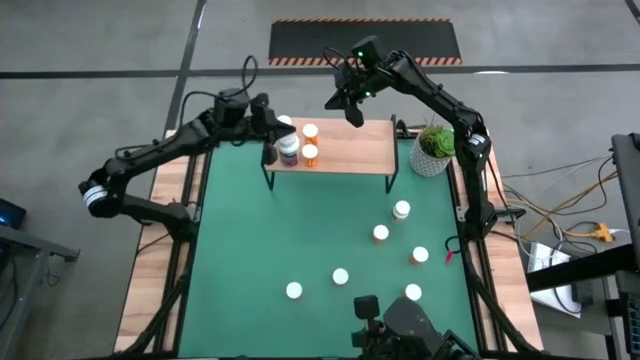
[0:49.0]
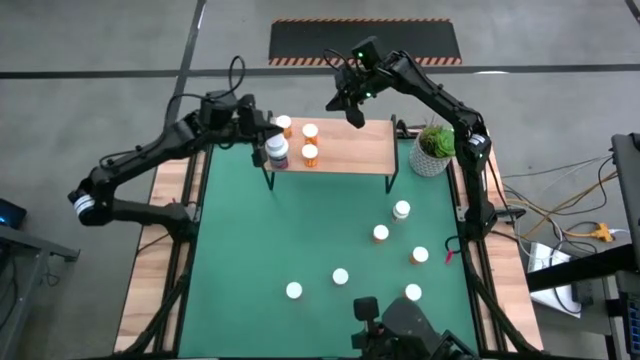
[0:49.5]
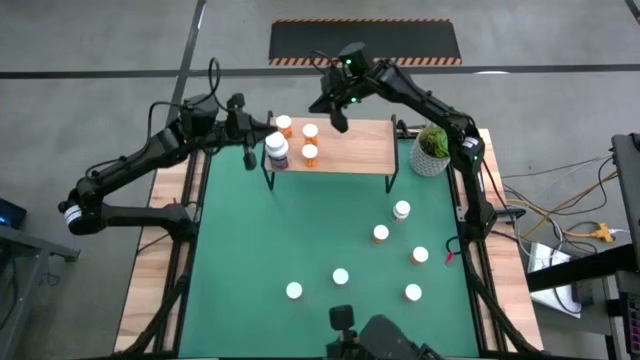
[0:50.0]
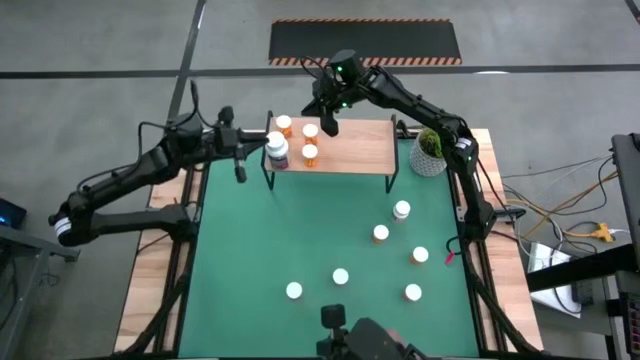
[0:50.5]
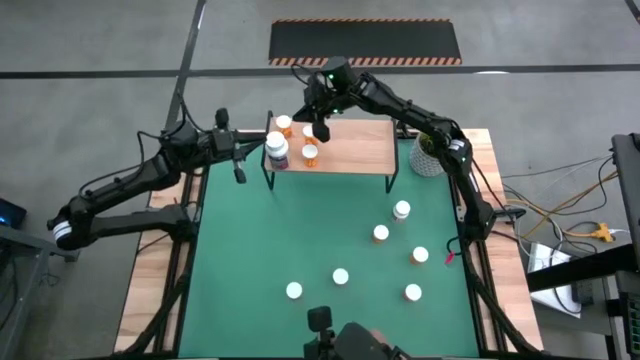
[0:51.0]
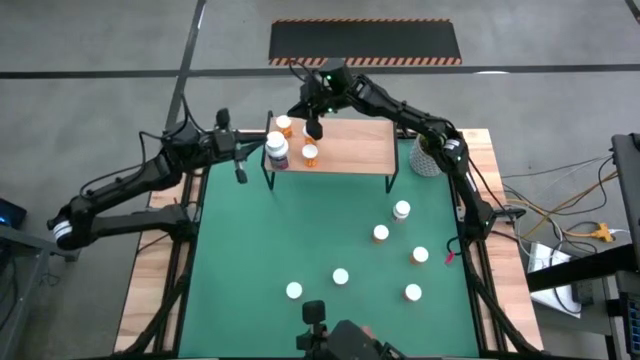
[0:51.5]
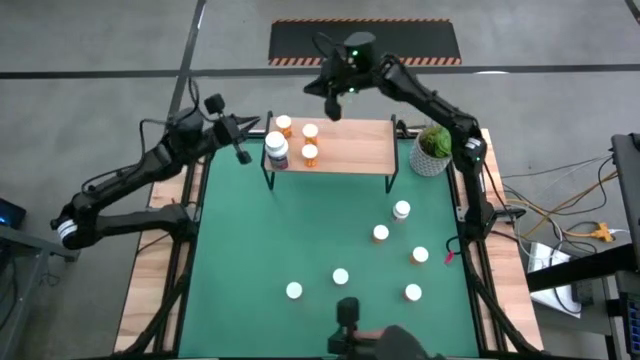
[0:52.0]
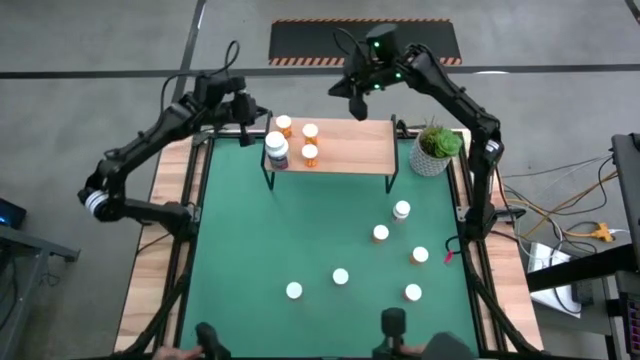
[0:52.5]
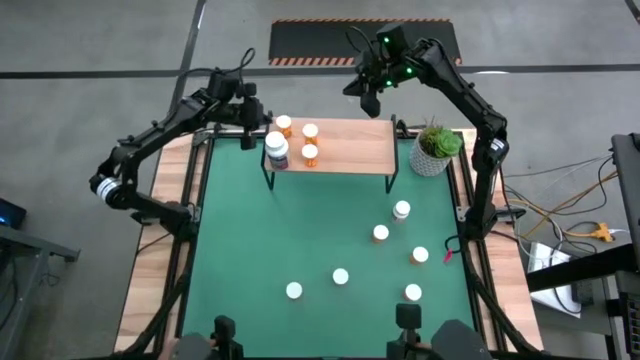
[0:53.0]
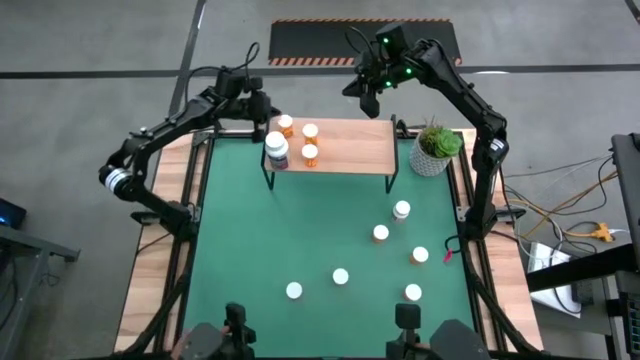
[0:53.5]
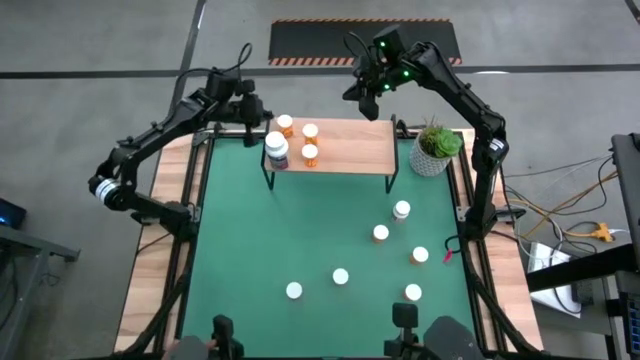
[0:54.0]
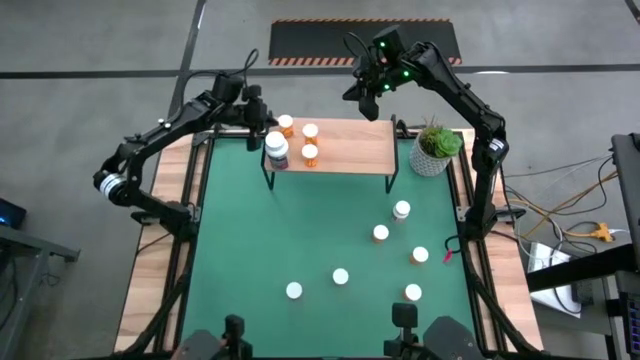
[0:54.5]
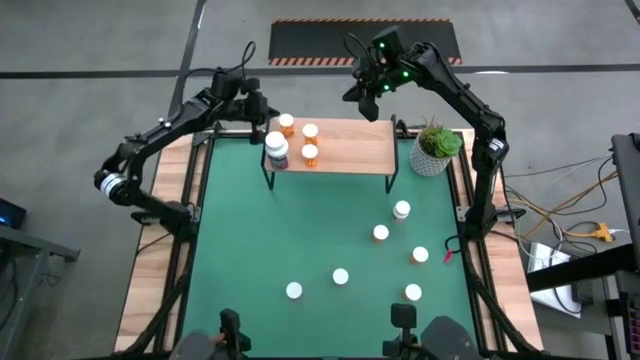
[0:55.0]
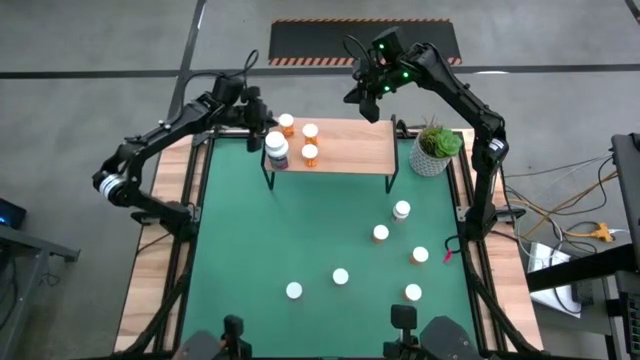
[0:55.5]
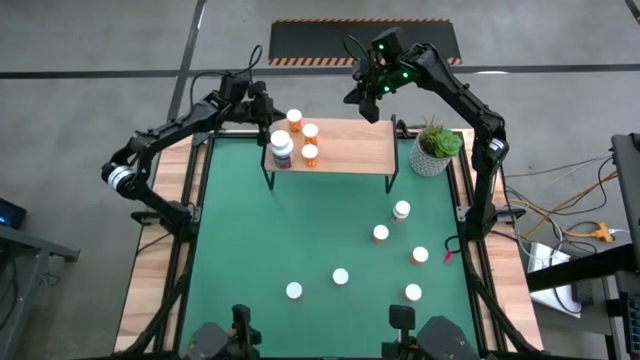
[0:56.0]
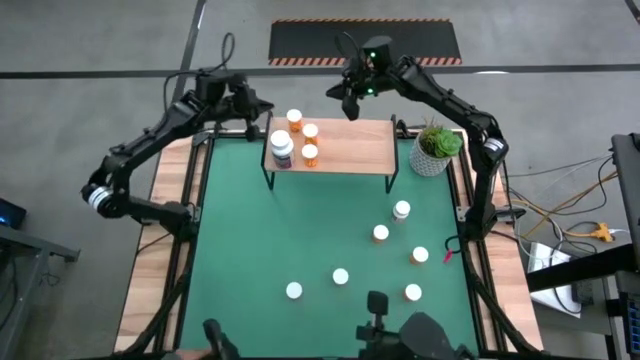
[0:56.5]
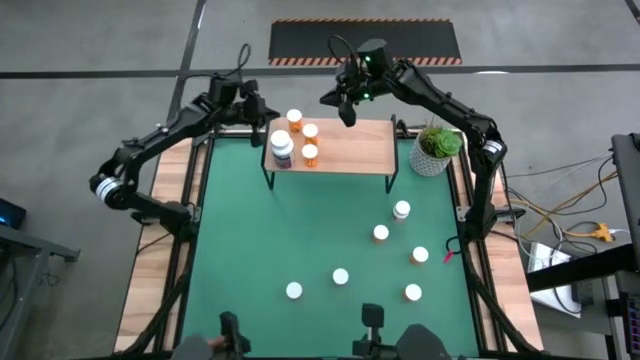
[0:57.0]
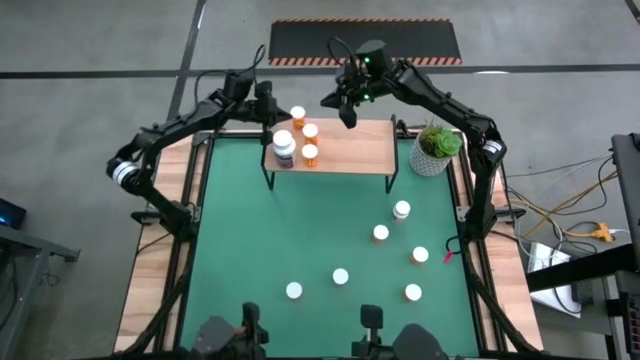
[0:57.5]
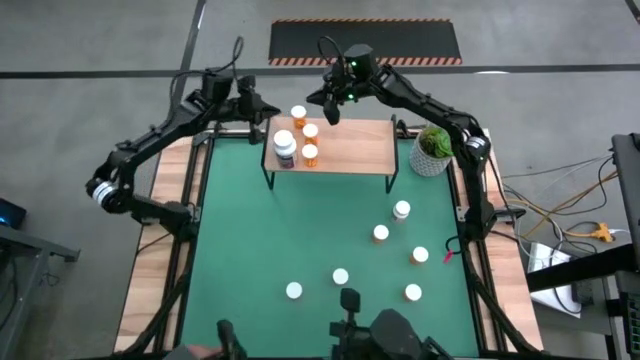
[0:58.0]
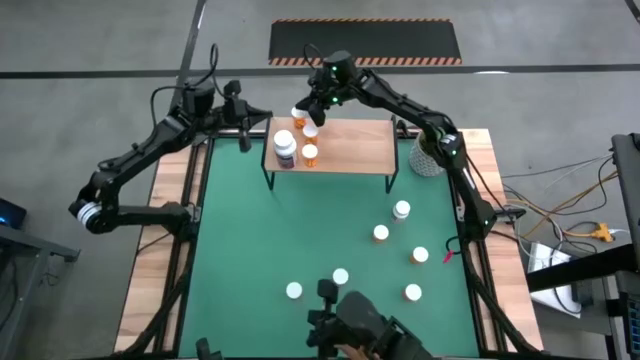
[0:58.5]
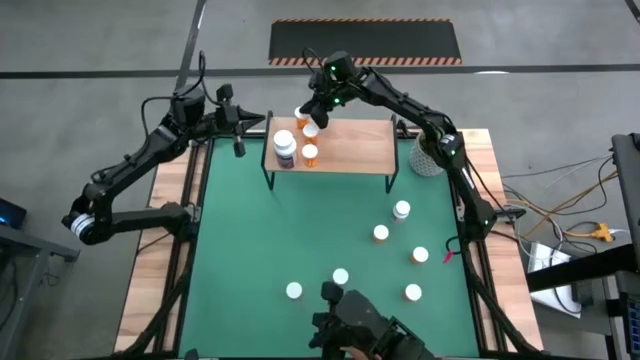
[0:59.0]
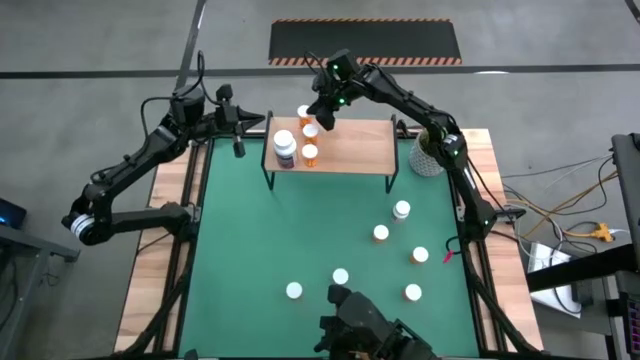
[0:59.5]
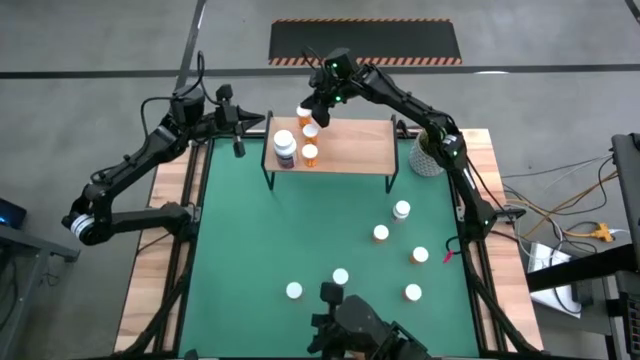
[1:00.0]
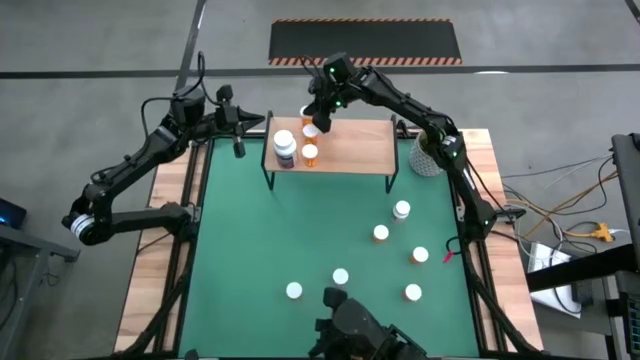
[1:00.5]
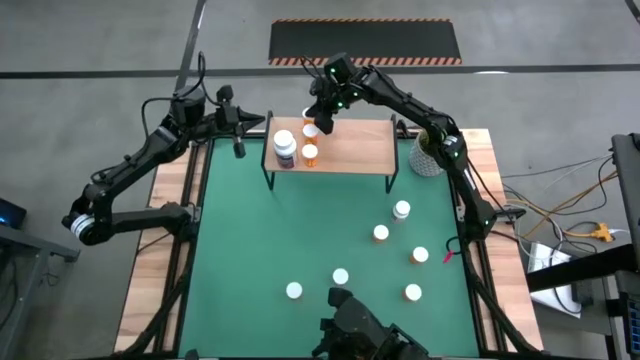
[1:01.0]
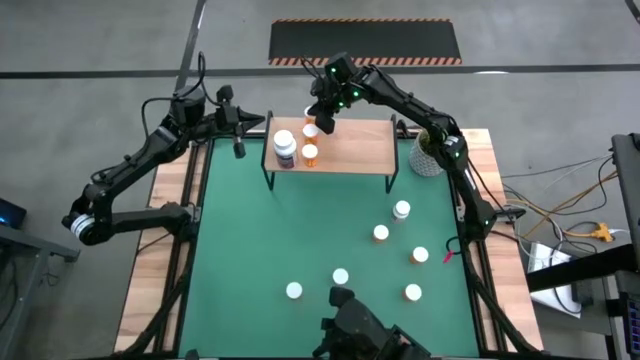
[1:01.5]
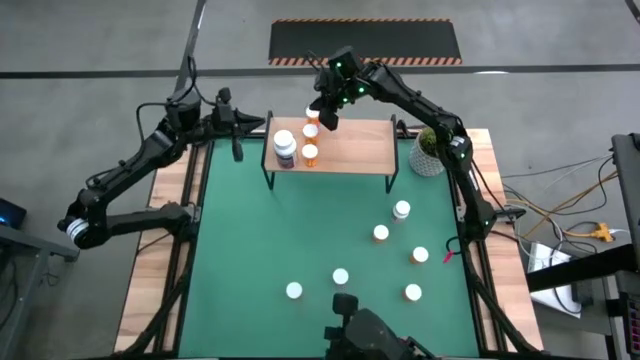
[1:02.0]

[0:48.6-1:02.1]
Task: Pick and place medicine bottles onto shelf by color
Put the orange pill bottle on the shelf aligned with the other orange pill bottle

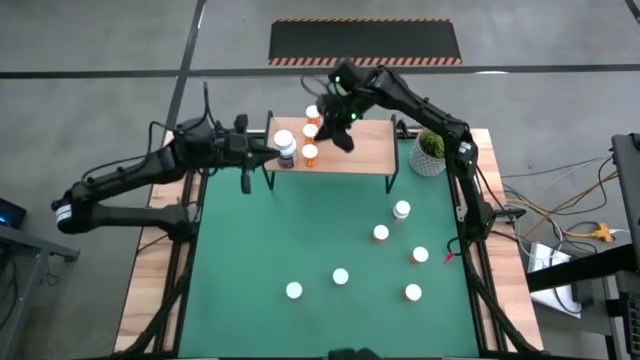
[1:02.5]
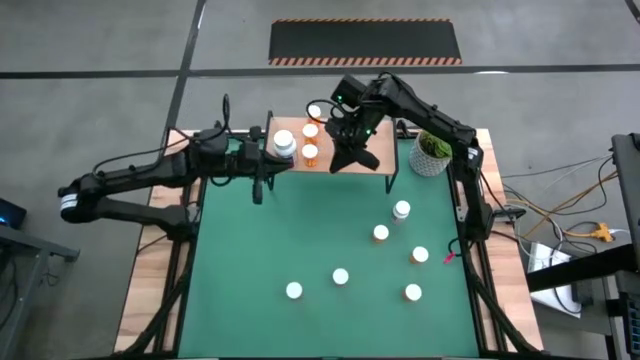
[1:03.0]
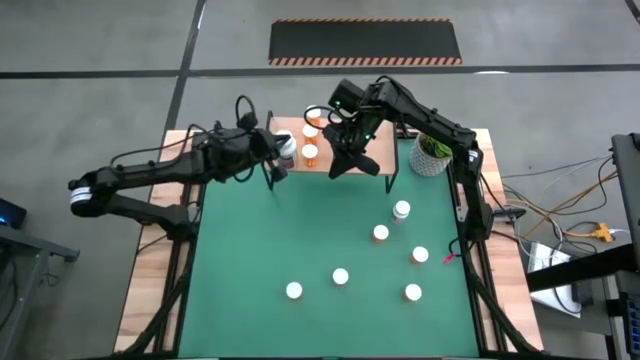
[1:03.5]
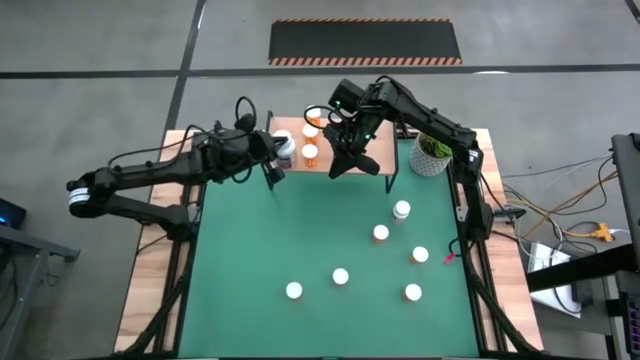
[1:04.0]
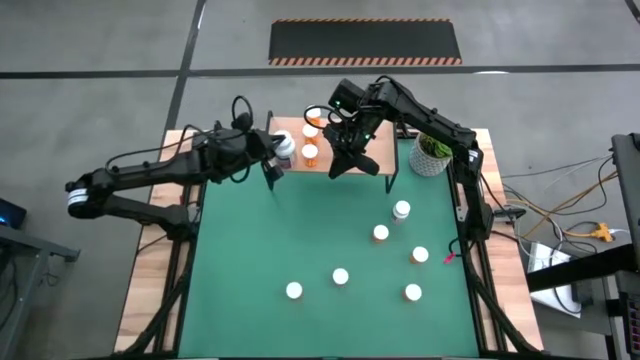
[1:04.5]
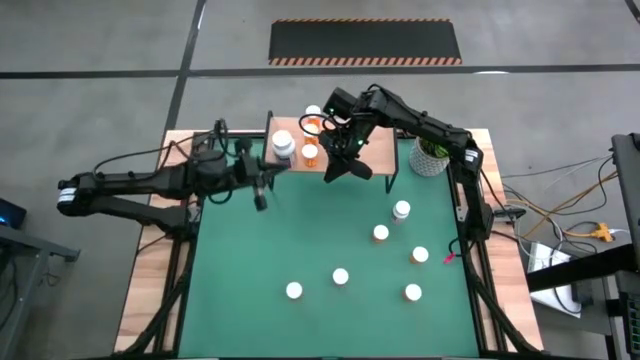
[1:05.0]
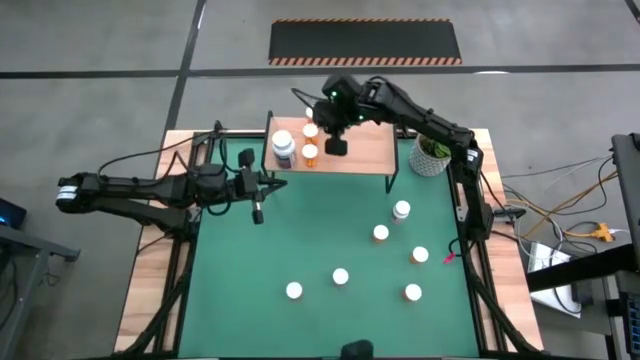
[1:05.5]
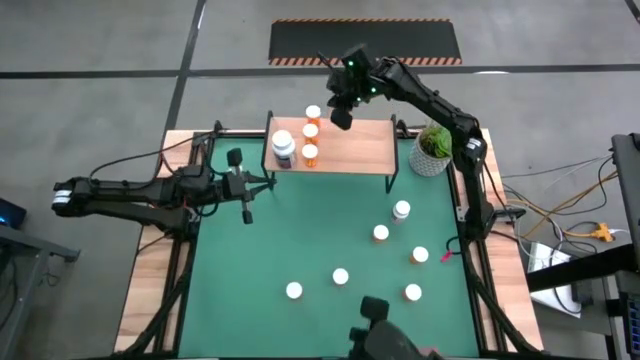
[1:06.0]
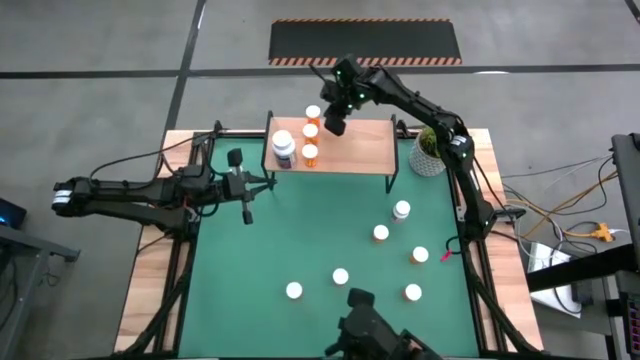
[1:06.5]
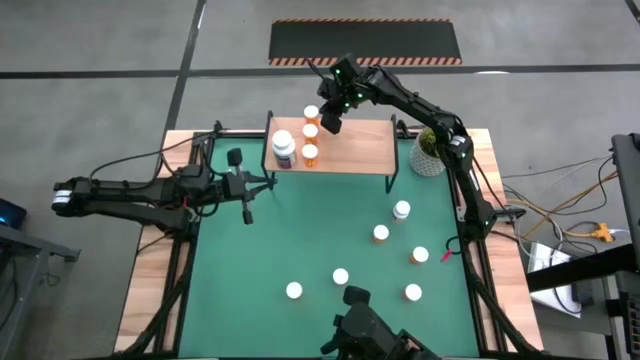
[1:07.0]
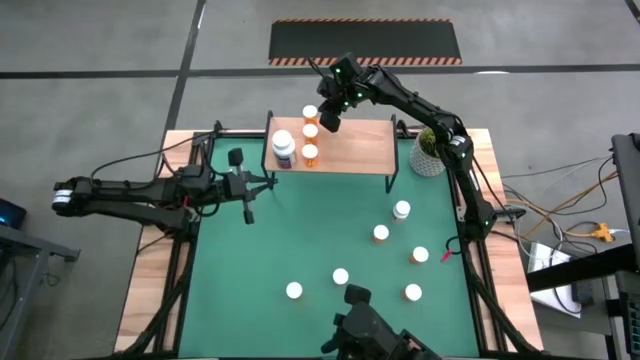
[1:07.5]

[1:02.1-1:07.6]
Adjust the pill bottles on the shelf

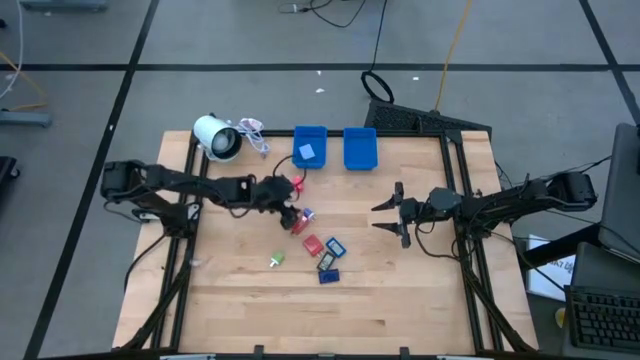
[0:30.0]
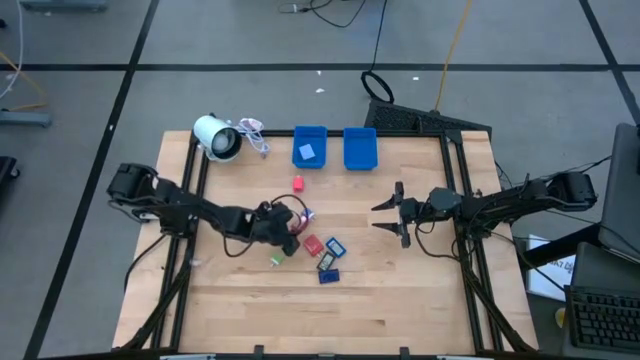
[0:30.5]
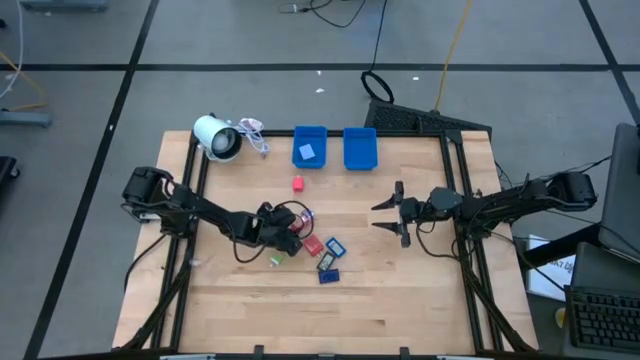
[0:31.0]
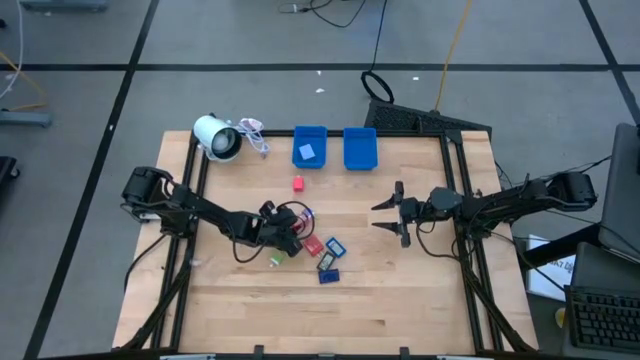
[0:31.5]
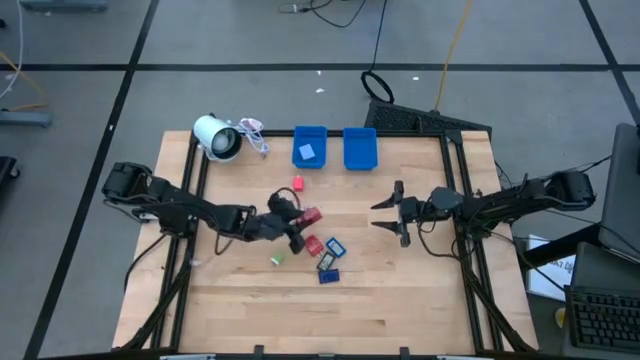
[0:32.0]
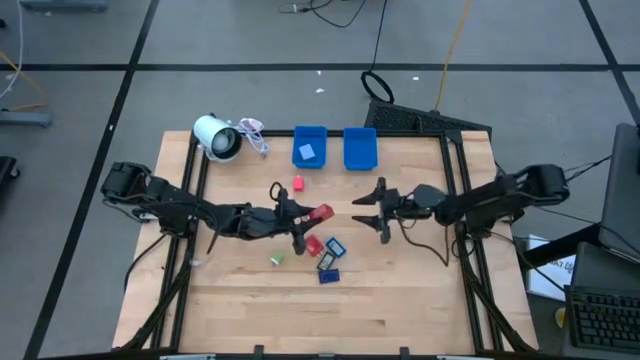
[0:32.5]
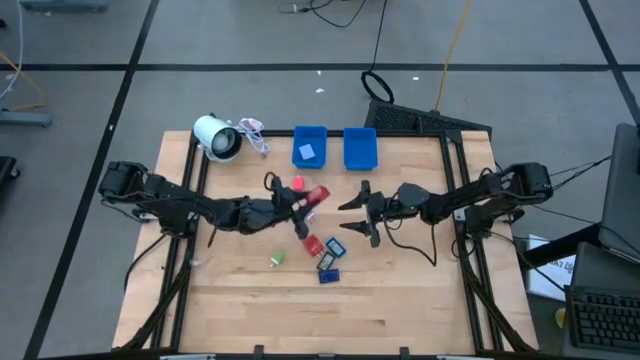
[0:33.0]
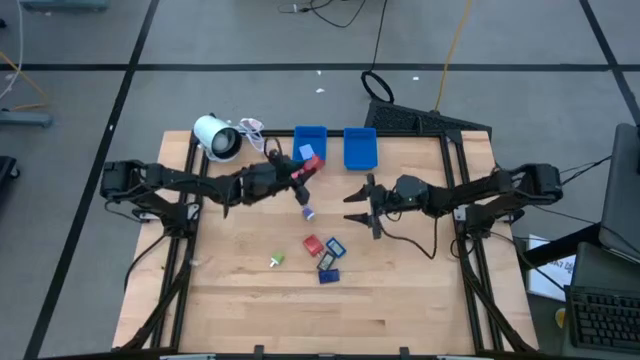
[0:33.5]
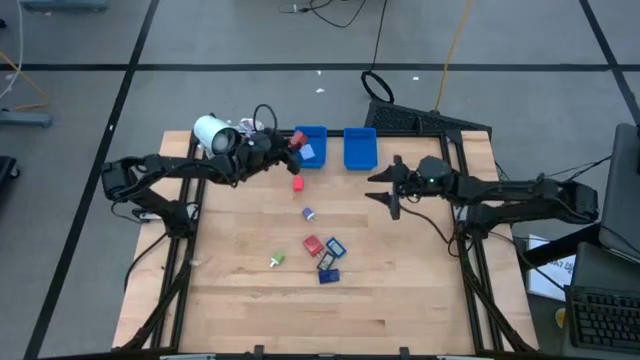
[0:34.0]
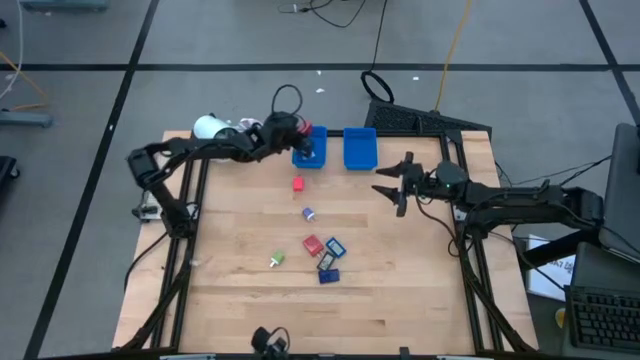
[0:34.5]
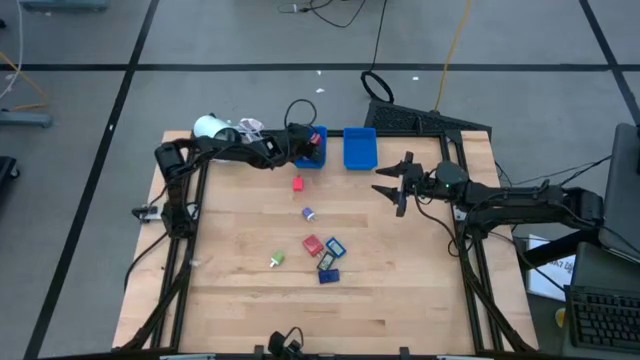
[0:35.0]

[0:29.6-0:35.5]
Task: Pick & Place Office items
Put the top red charger adapter into the left basket
